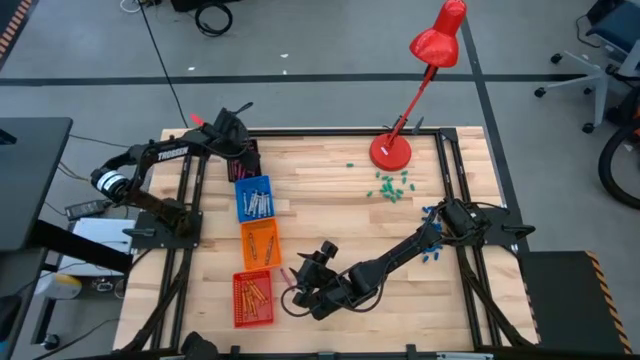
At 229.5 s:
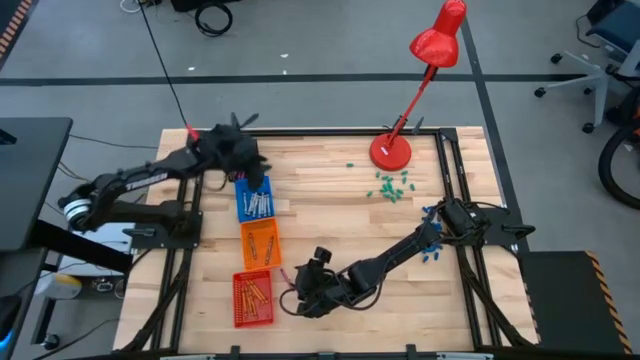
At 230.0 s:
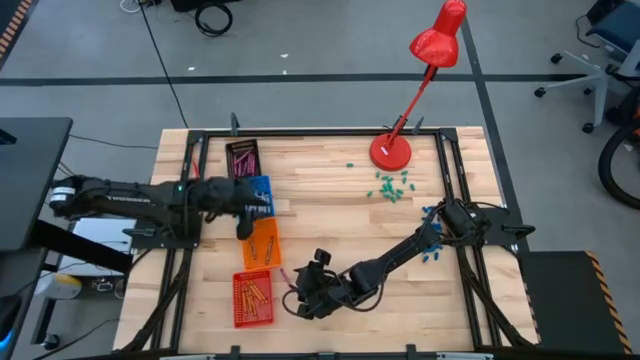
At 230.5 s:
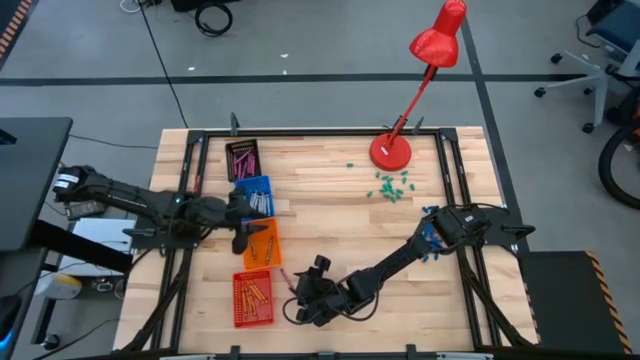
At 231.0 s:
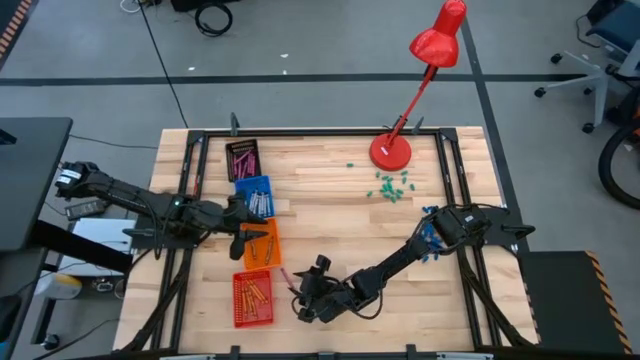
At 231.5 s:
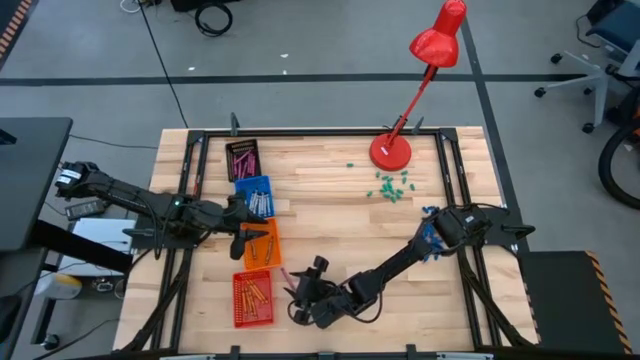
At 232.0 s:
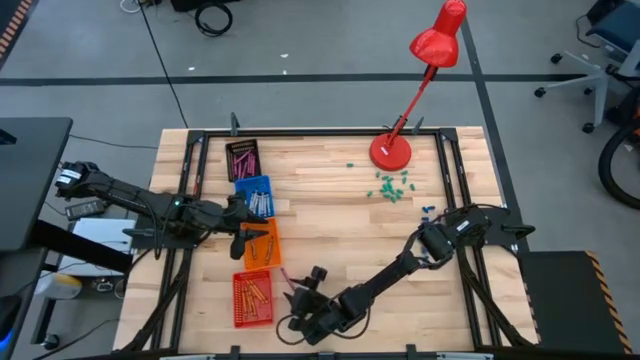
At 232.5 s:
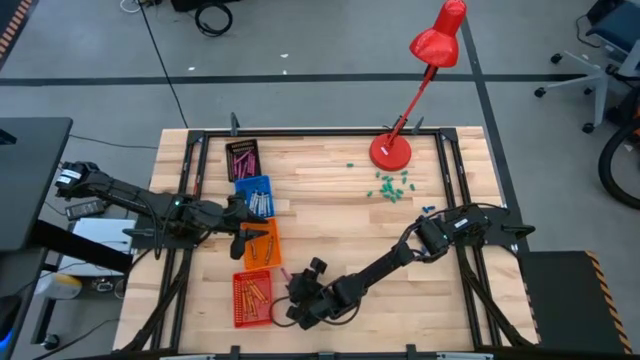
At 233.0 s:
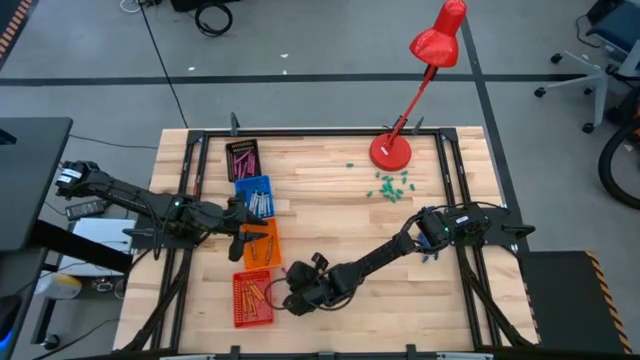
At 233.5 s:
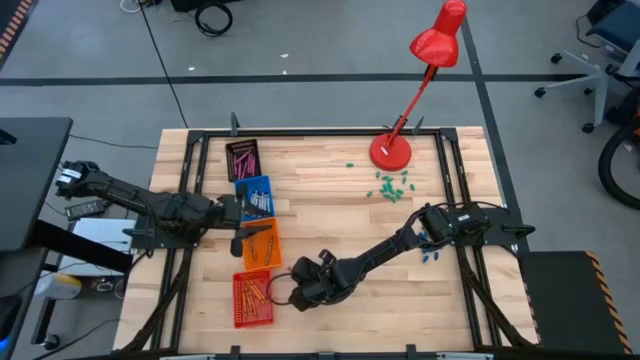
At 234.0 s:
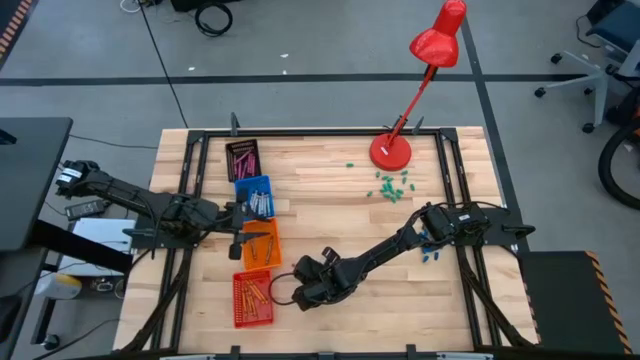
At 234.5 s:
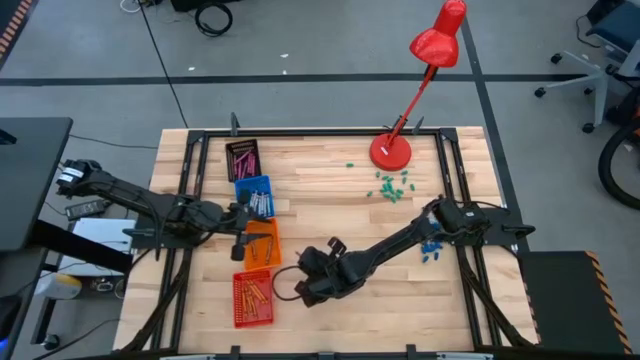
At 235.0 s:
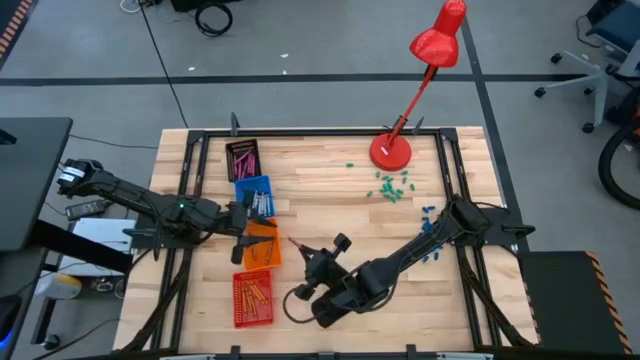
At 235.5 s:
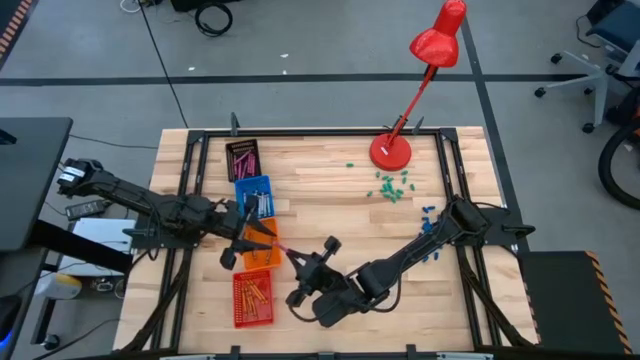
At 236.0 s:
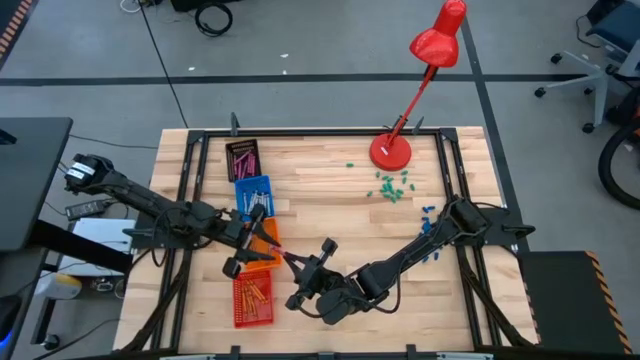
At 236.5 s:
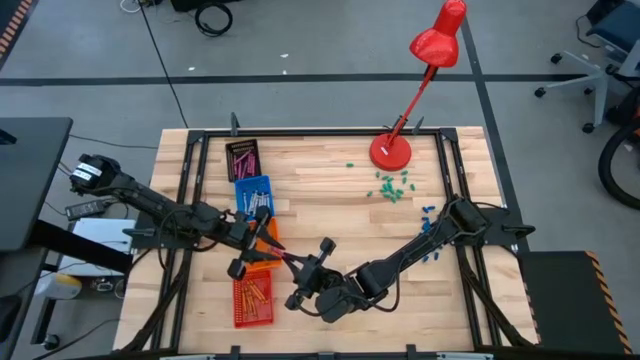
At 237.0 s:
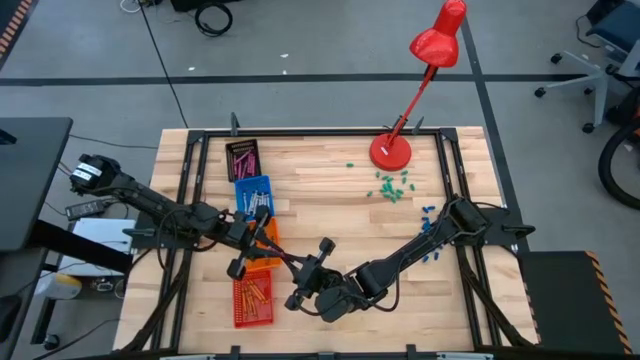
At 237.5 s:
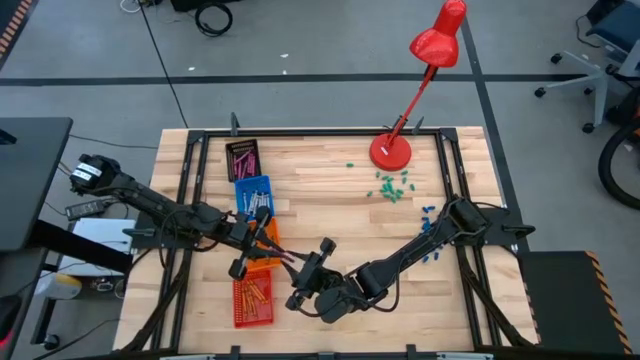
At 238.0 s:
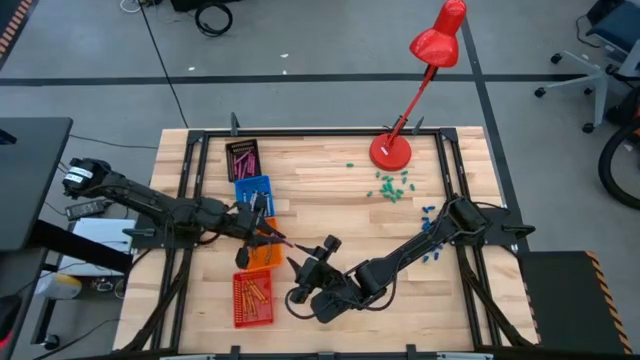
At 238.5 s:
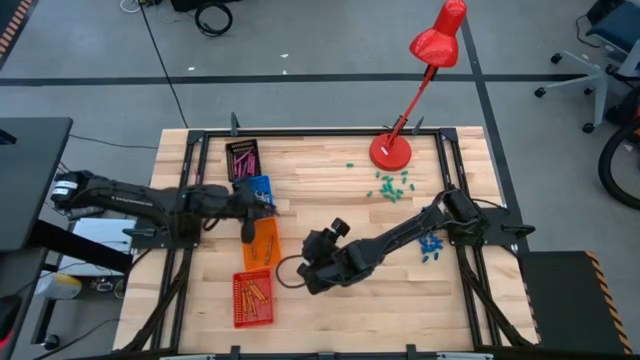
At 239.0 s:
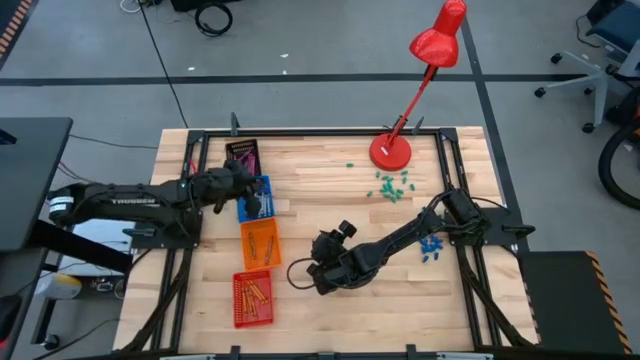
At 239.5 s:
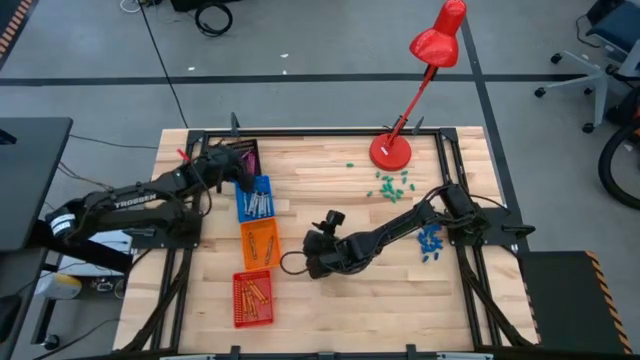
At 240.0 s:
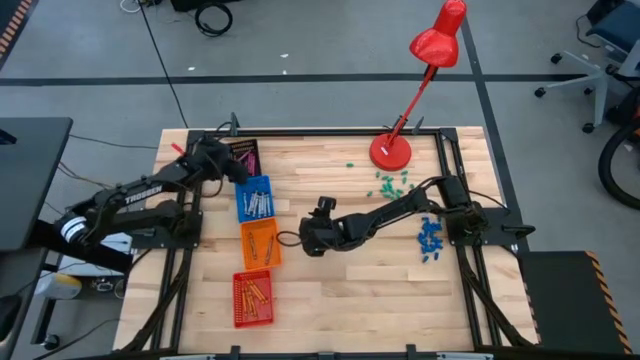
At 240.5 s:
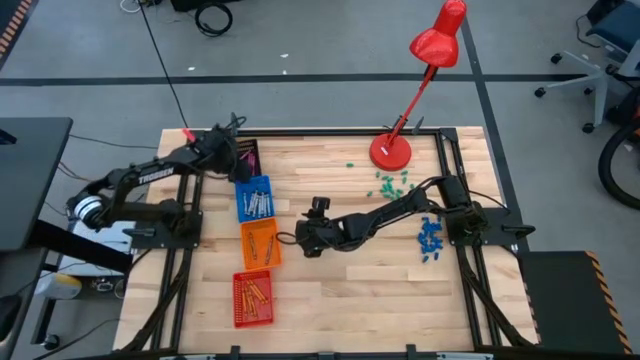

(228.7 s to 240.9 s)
Task: Sort crayons
Put the pink crayon into the black bin

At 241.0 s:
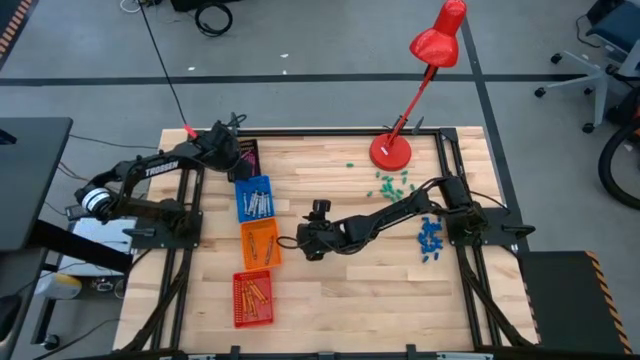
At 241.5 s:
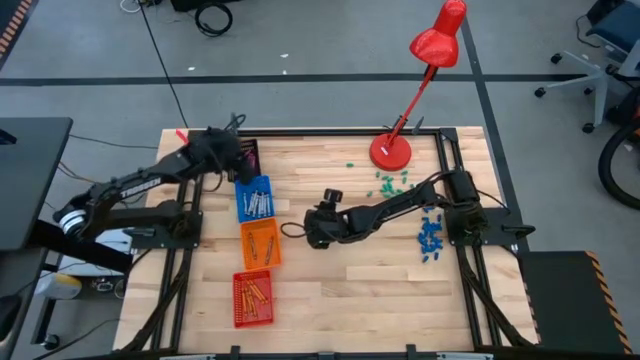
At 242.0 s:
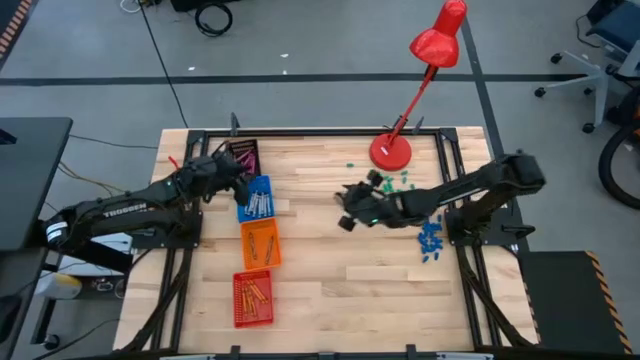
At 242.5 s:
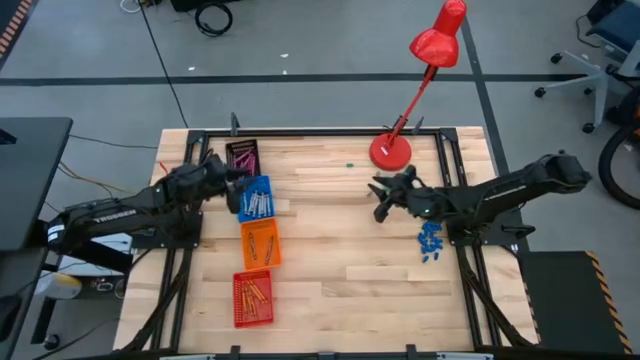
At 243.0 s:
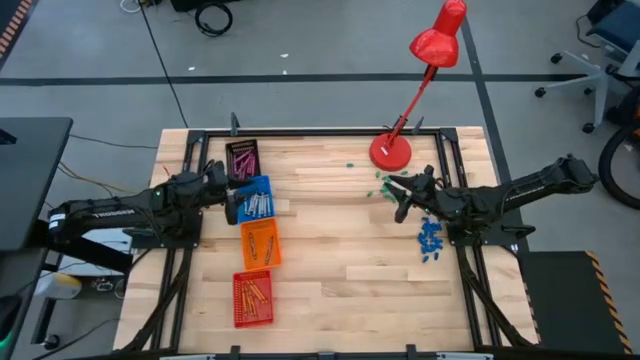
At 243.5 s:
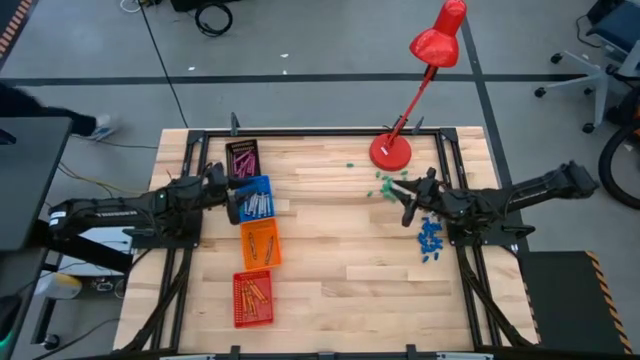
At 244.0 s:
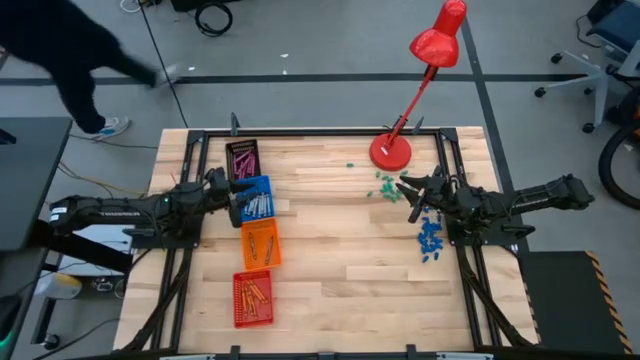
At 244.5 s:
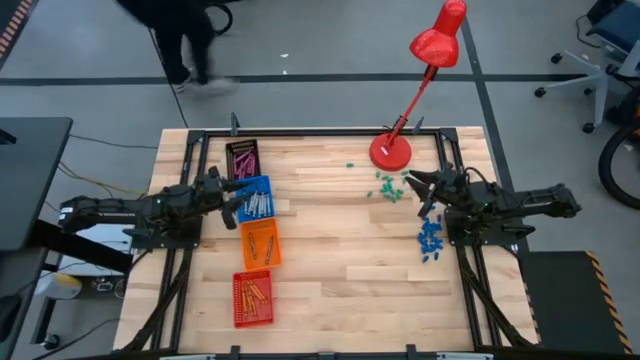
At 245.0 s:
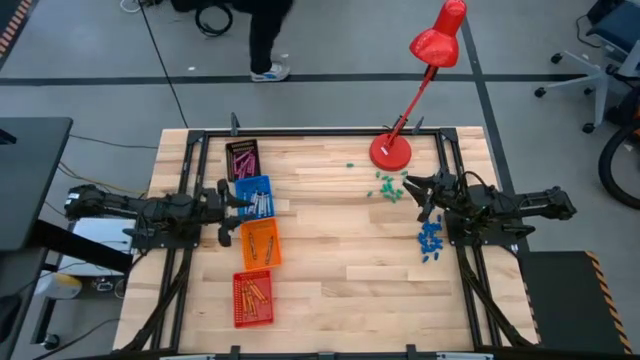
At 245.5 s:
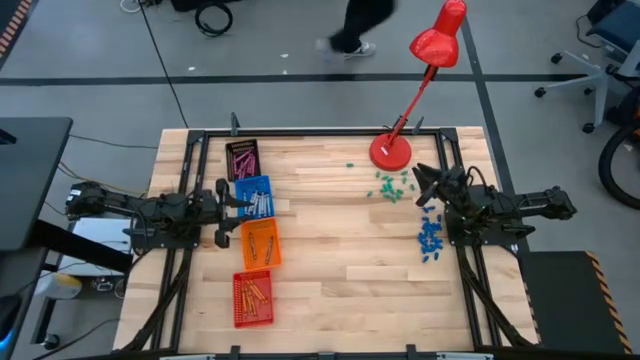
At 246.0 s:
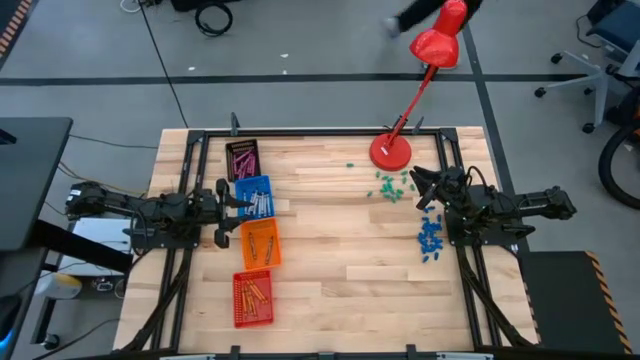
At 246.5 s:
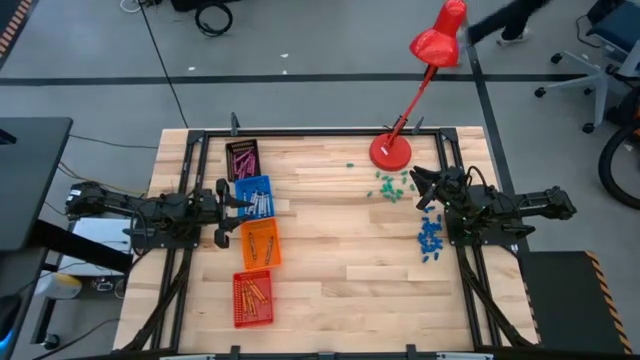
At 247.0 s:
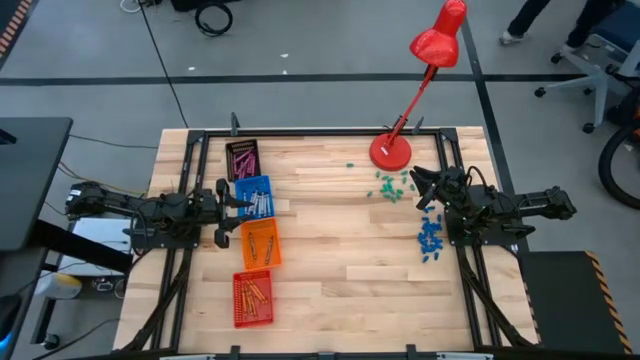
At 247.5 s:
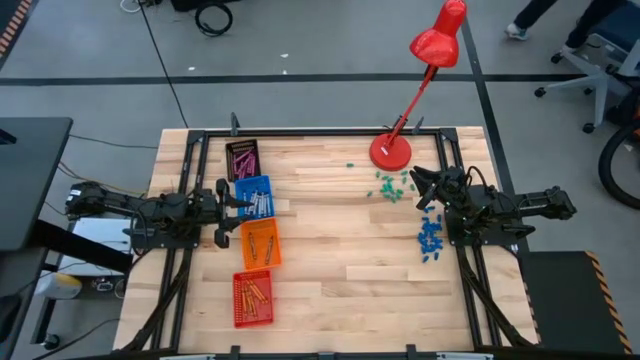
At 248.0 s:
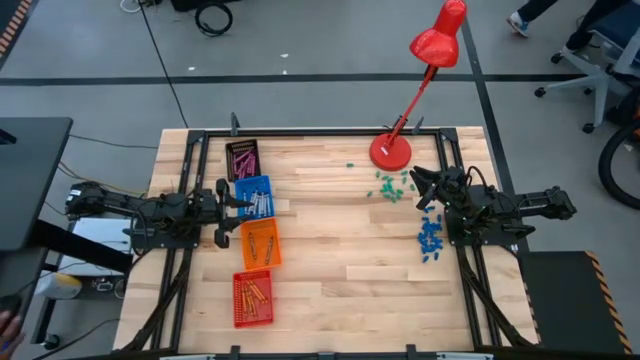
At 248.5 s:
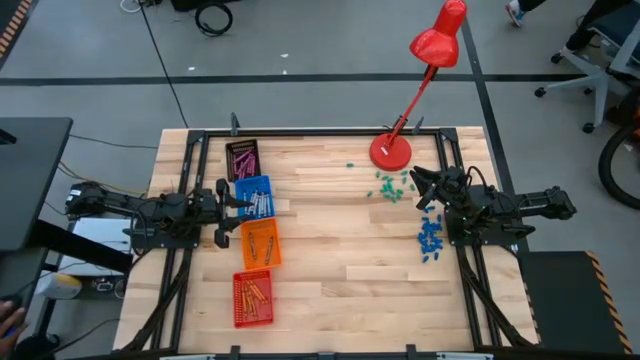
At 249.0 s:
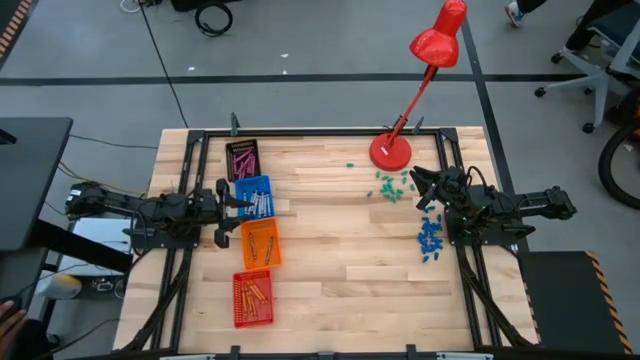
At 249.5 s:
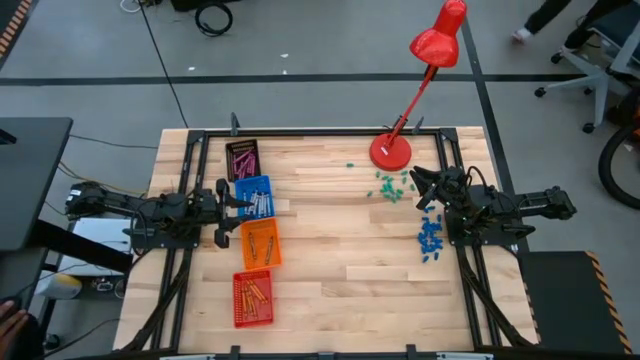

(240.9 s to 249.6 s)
Return to Home Position
